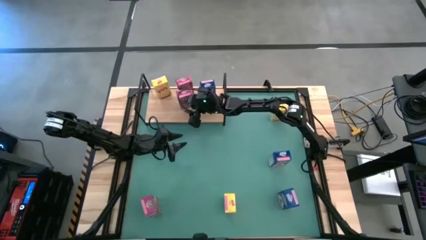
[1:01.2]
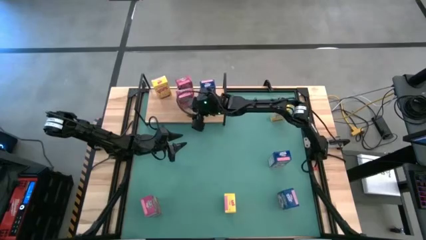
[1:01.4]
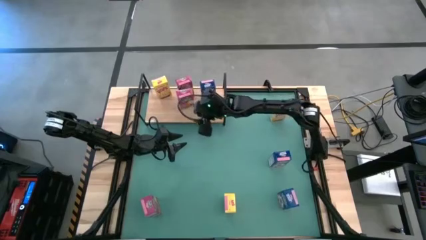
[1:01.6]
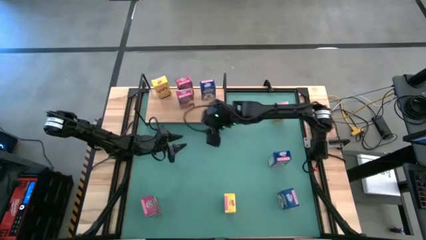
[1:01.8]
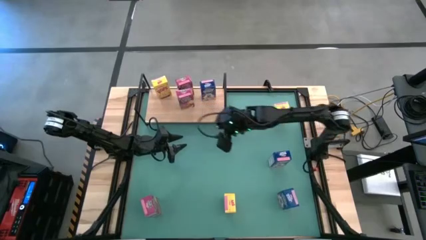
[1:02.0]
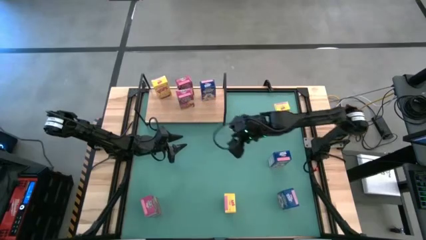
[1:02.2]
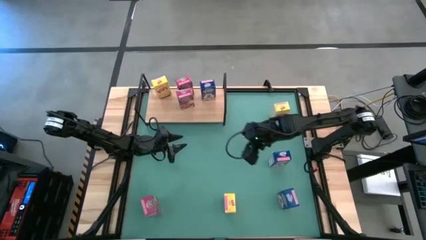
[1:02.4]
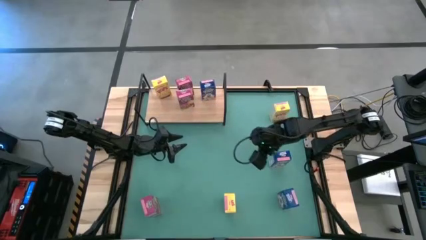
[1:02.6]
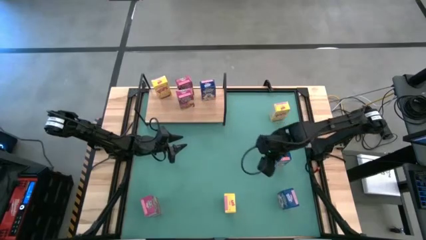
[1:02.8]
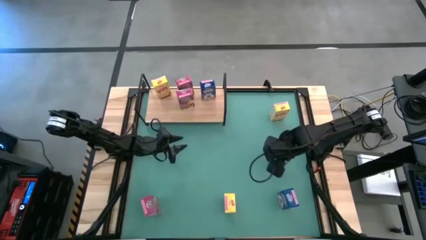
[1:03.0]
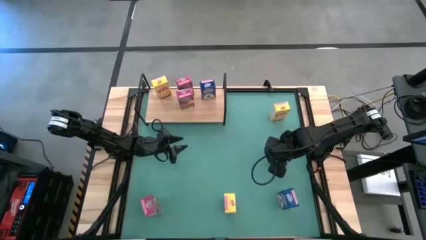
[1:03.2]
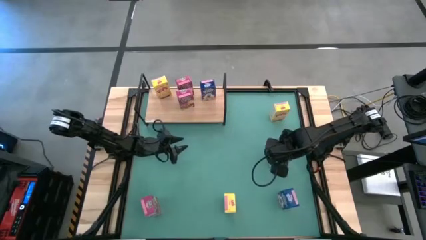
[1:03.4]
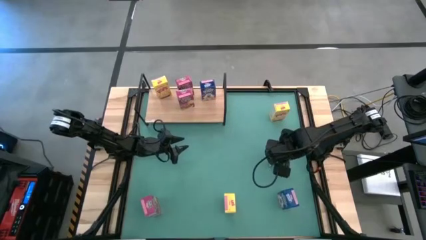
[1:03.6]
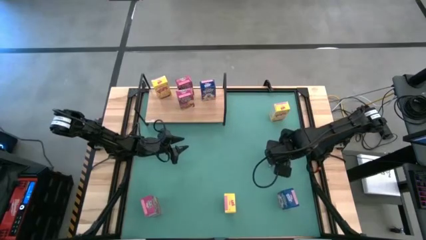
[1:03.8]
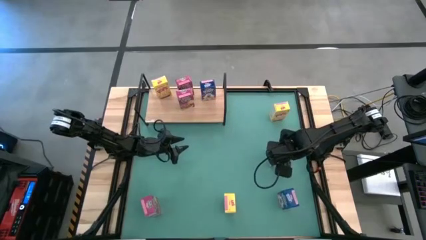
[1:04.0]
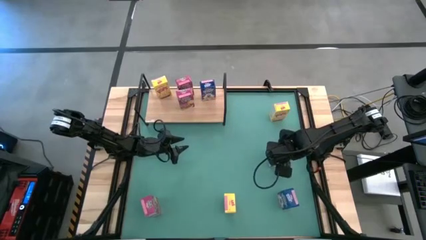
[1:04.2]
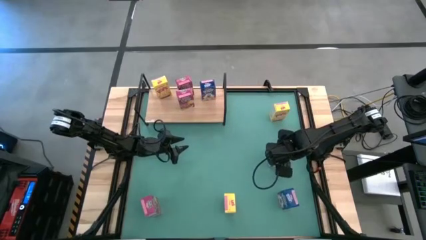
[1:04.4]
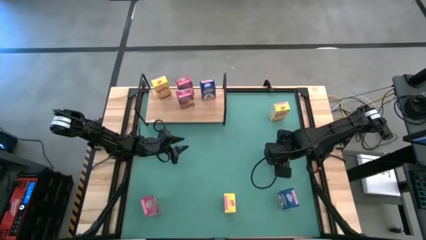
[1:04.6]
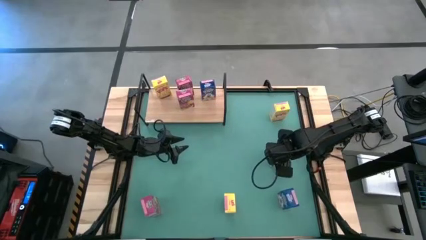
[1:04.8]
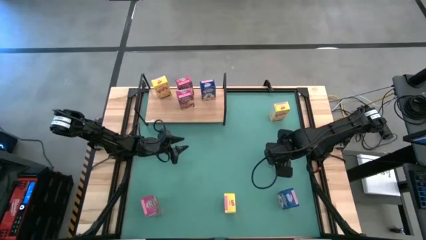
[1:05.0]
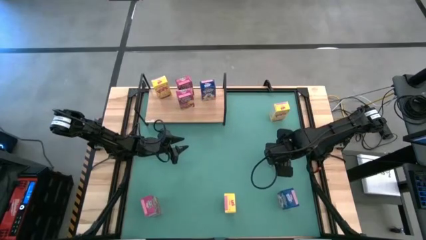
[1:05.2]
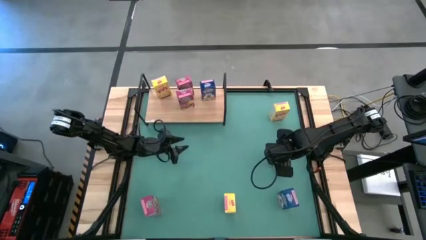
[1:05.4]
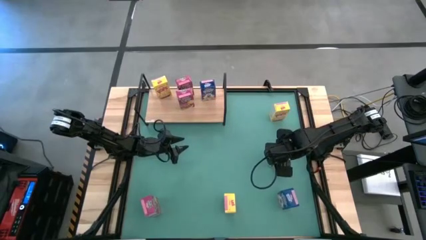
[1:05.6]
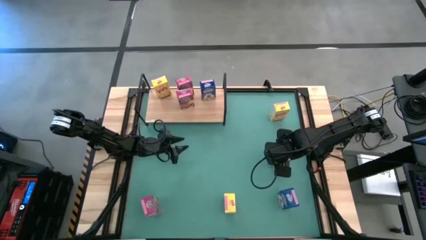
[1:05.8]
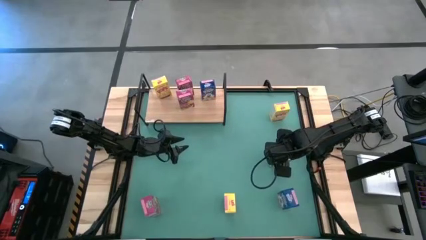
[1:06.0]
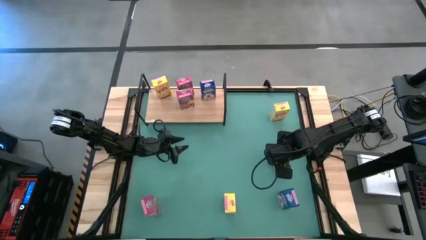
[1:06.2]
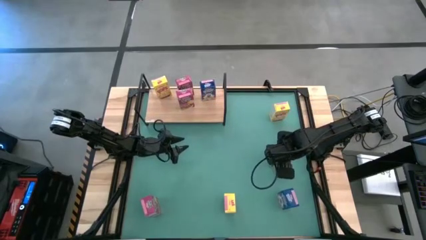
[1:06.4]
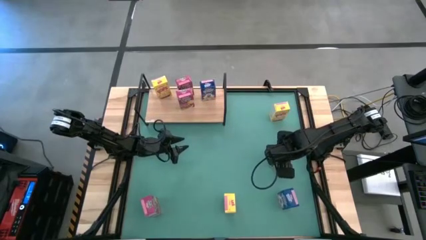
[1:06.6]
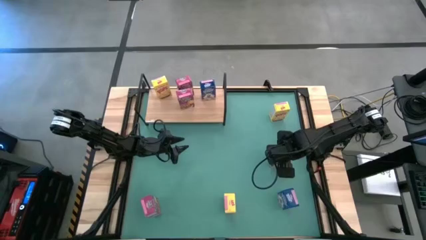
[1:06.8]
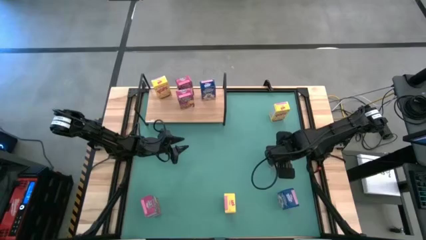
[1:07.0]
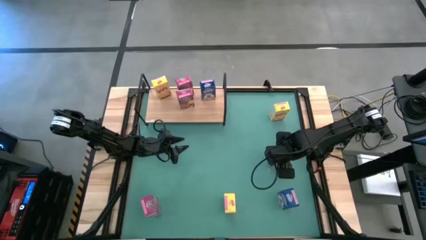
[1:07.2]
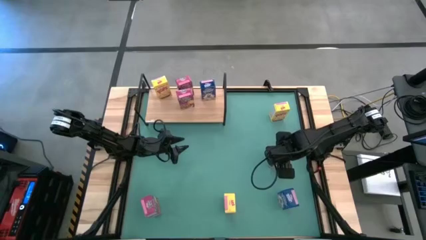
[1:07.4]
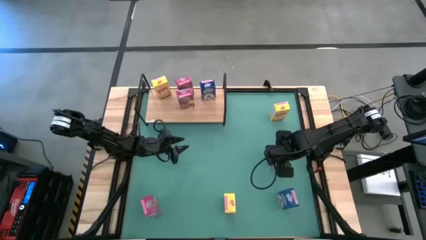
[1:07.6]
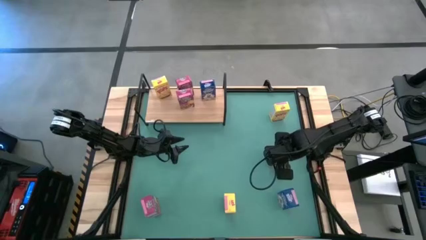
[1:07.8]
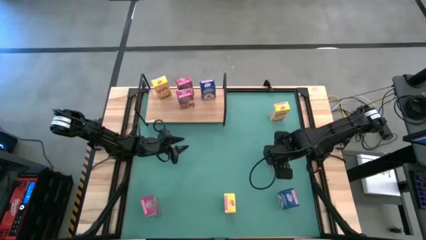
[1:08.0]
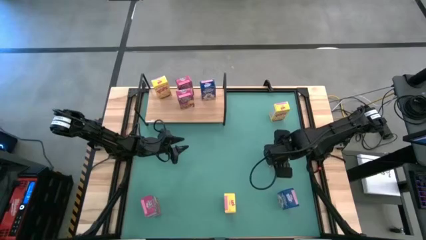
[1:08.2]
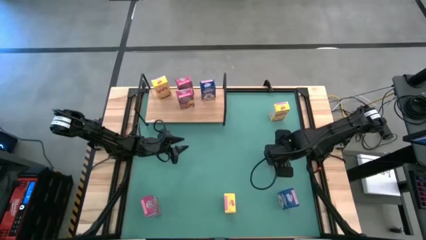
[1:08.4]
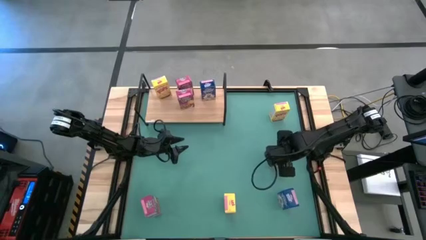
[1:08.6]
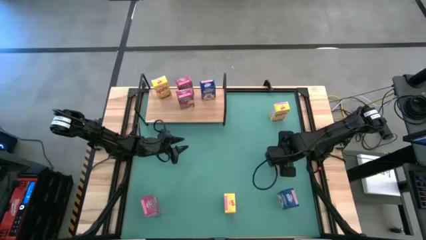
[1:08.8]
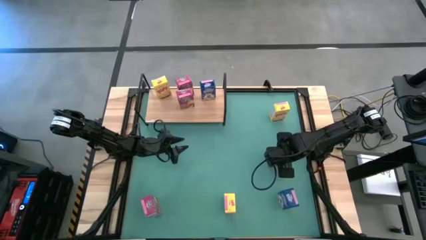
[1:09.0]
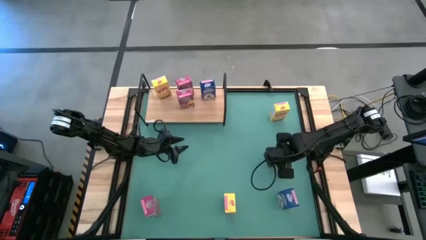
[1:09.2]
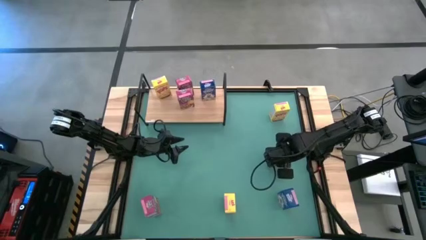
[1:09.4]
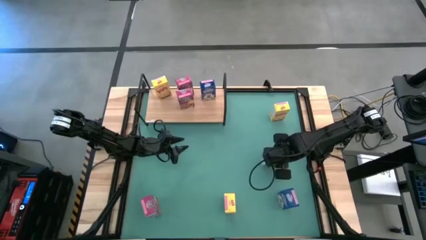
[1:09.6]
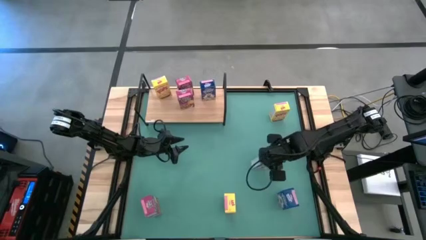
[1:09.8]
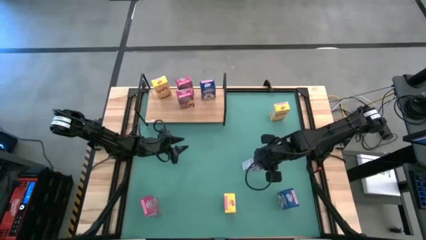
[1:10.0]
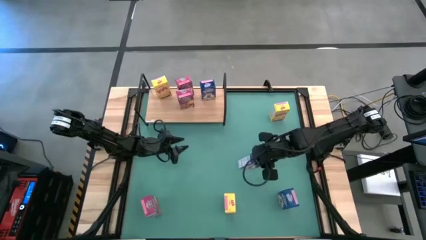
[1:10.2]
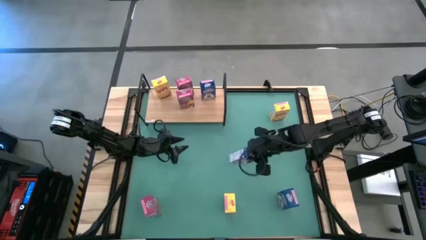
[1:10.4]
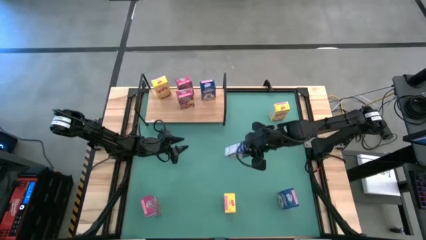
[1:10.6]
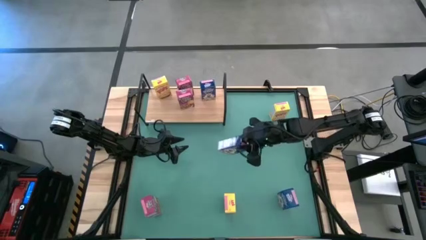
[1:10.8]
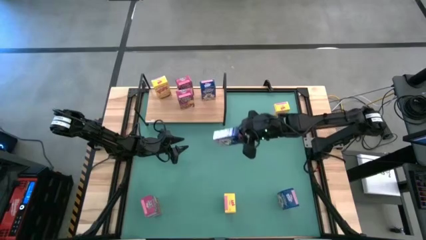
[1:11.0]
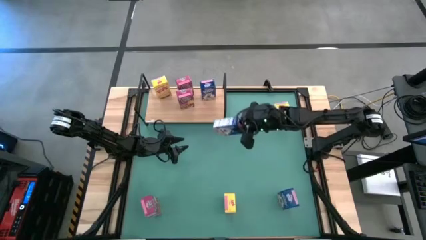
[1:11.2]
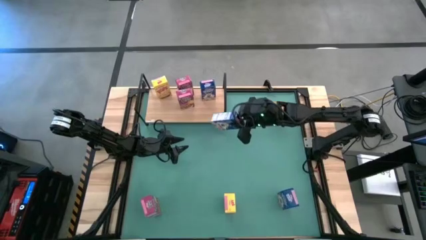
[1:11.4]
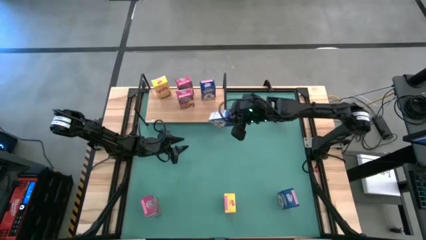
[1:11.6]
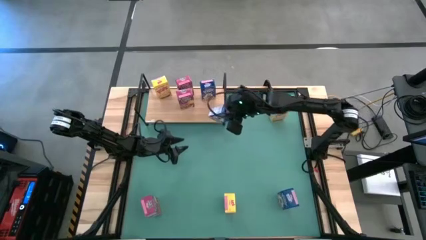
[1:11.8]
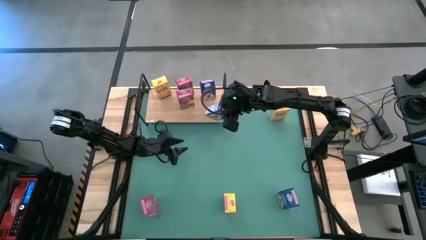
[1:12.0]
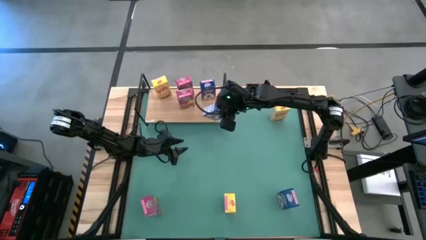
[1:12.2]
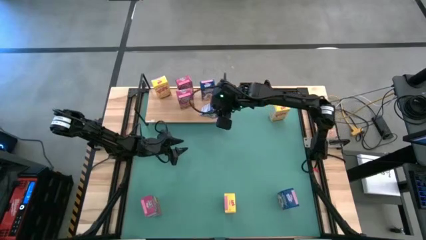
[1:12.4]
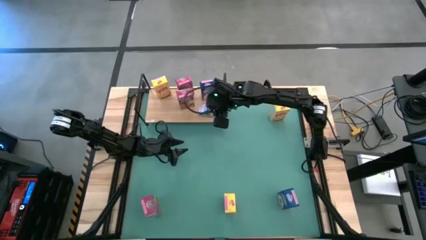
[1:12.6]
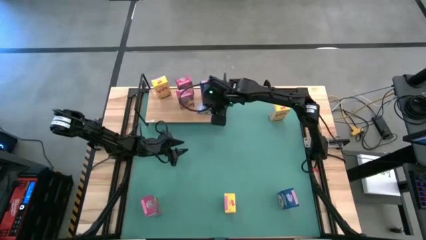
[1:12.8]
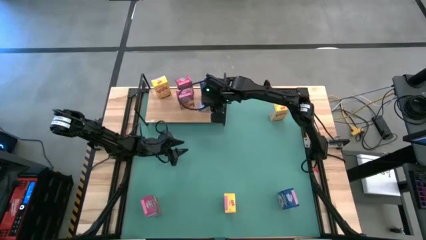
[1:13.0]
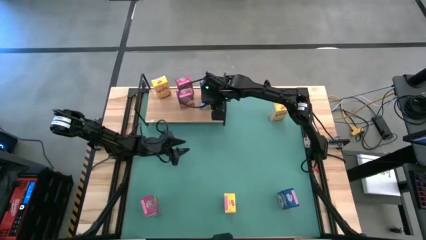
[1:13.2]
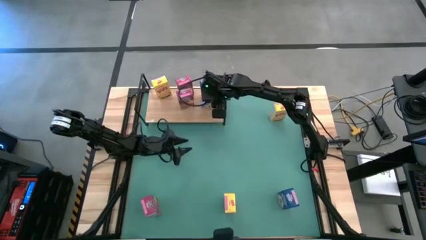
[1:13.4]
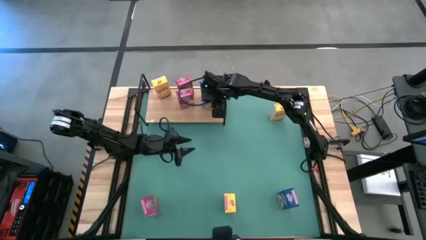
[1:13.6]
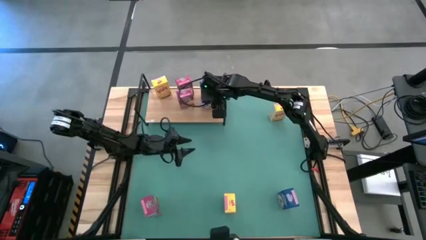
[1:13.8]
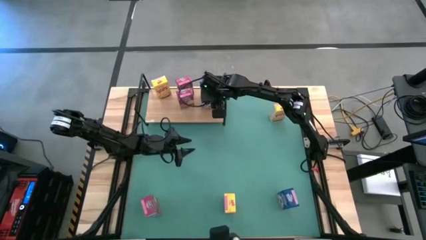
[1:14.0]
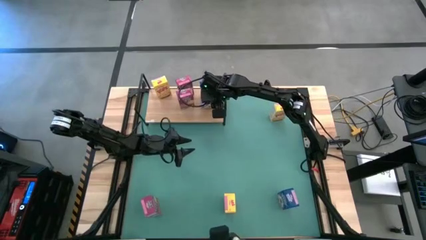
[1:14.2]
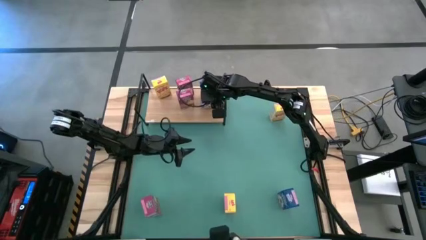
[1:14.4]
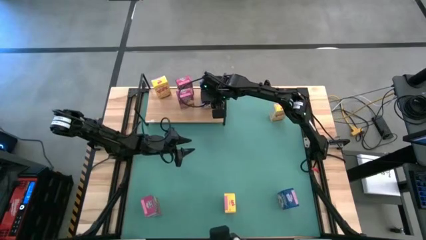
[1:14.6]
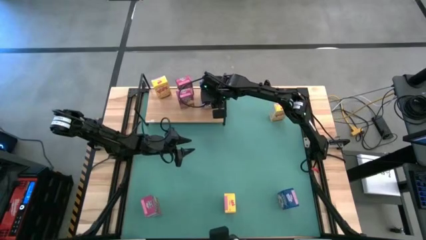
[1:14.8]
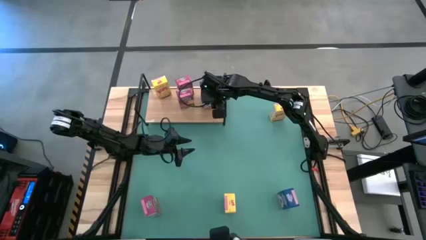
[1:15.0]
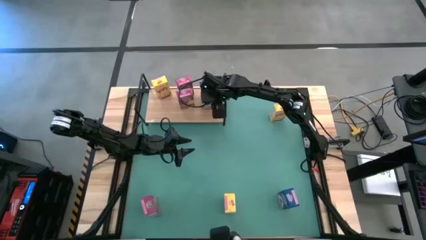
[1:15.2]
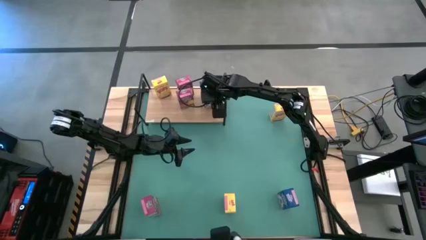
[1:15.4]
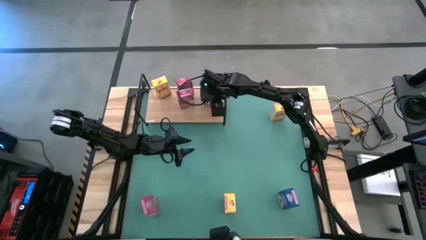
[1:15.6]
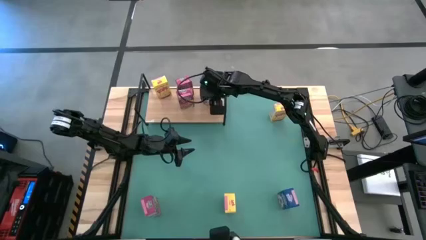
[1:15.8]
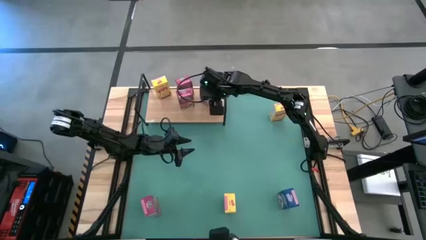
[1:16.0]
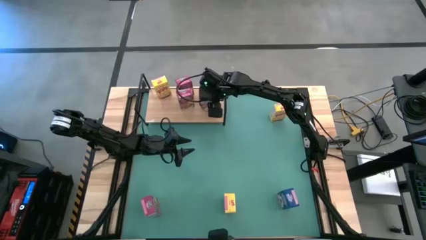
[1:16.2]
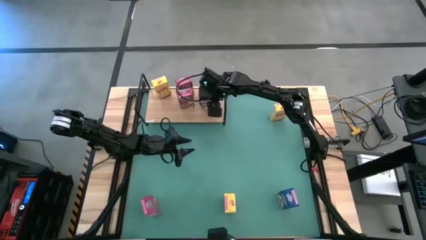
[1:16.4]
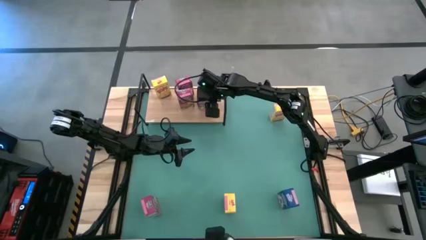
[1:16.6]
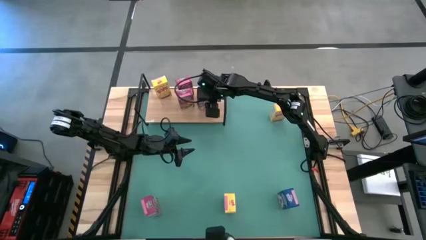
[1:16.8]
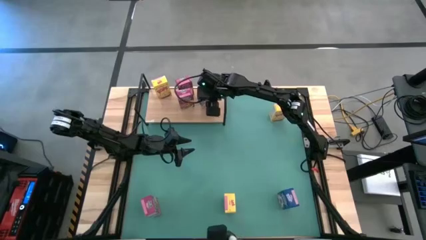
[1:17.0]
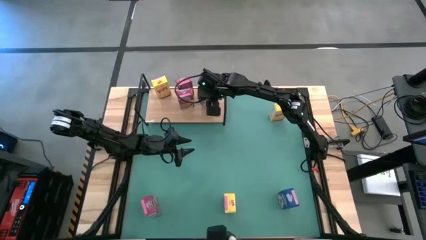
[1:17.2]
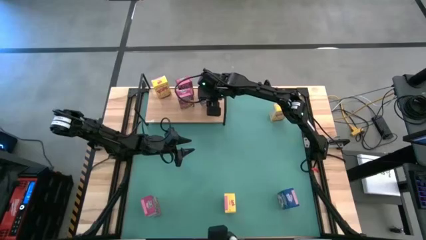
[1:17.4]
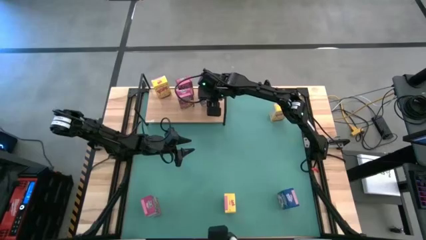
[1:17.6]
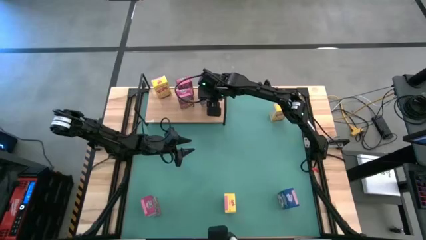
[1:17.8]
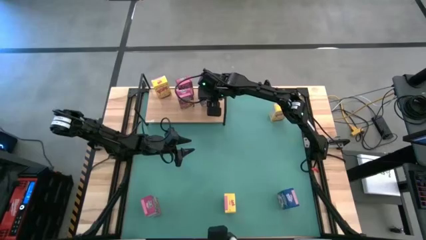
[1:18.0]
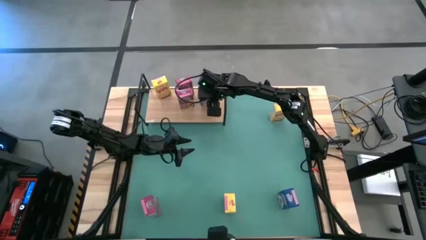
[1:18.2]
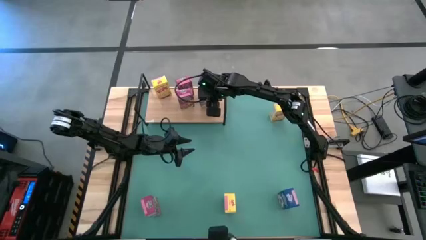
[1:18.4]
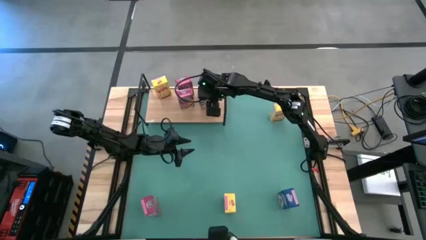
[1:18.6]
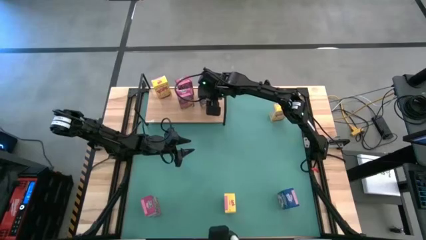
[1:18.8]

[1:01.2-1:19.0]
Task: Stack cereal on shelf
Put the top blue cereal box on the shelf aligned with the other blue cereal box
